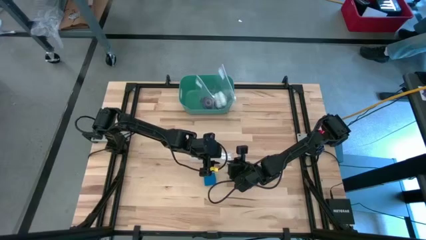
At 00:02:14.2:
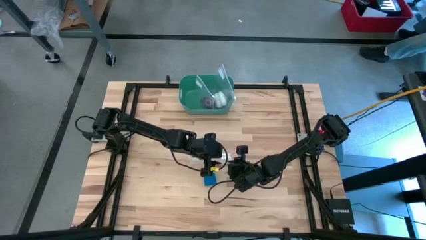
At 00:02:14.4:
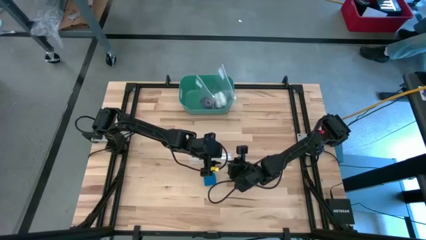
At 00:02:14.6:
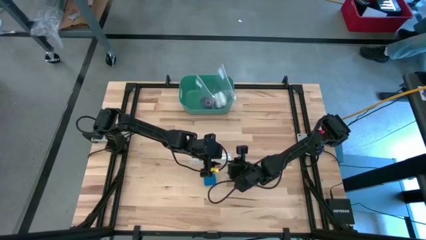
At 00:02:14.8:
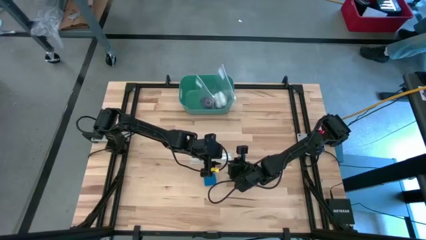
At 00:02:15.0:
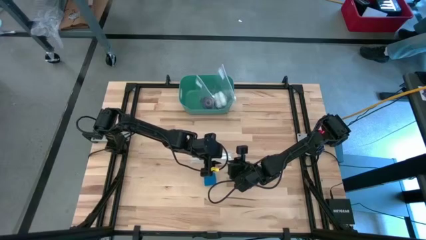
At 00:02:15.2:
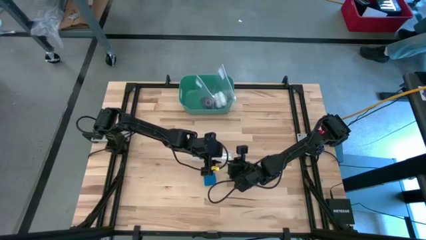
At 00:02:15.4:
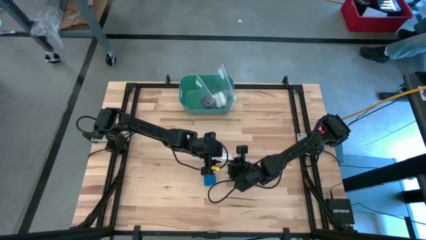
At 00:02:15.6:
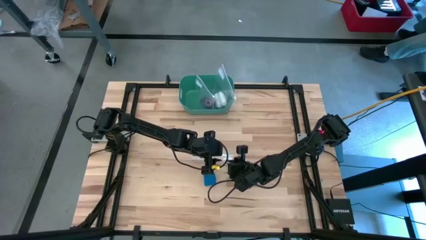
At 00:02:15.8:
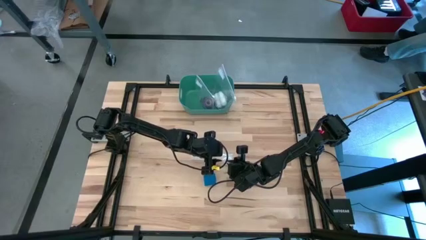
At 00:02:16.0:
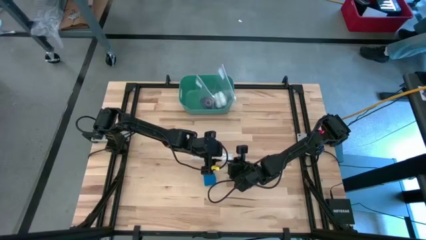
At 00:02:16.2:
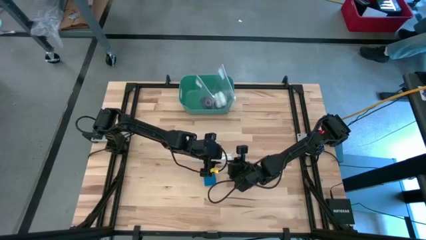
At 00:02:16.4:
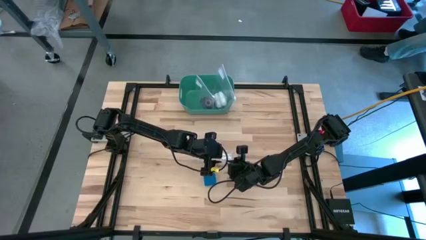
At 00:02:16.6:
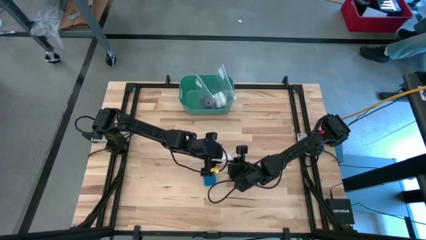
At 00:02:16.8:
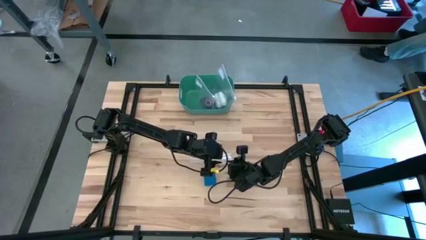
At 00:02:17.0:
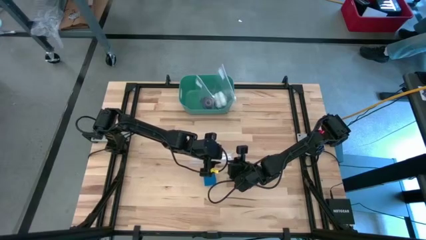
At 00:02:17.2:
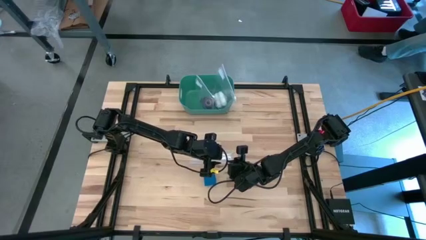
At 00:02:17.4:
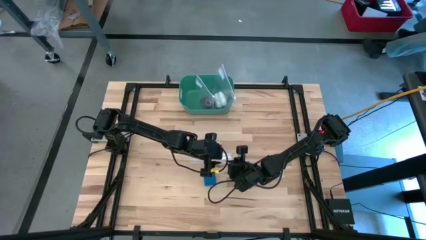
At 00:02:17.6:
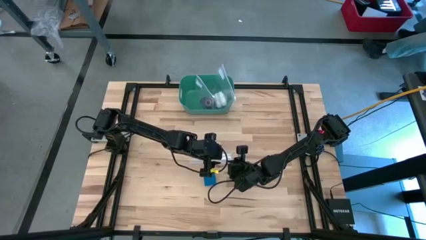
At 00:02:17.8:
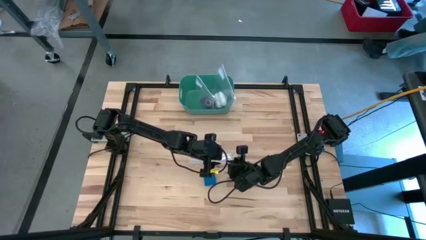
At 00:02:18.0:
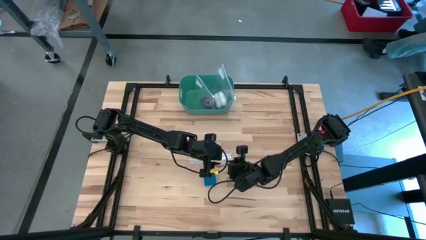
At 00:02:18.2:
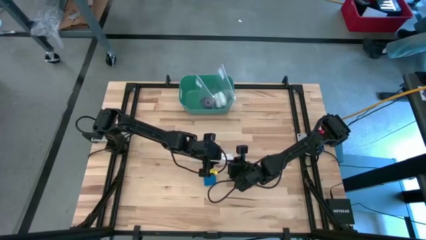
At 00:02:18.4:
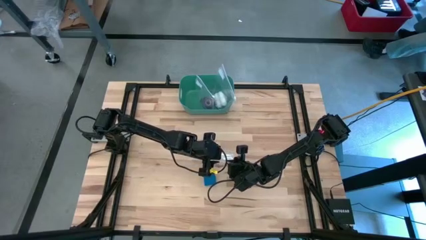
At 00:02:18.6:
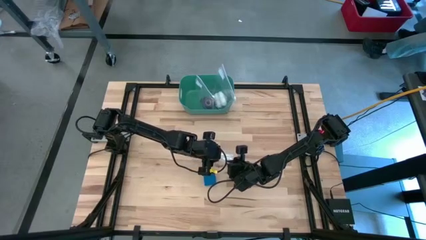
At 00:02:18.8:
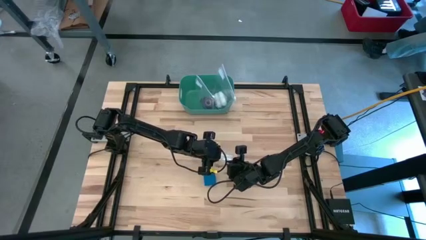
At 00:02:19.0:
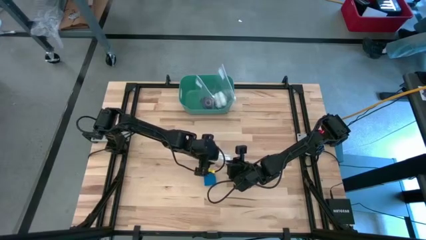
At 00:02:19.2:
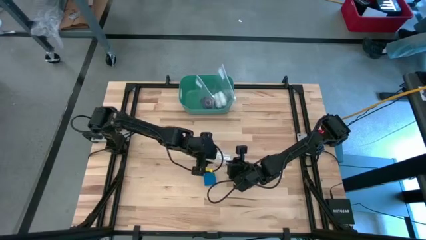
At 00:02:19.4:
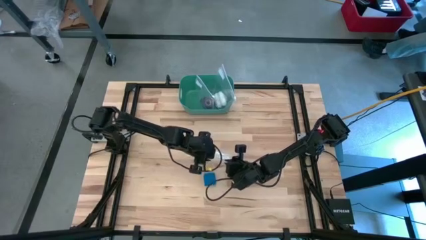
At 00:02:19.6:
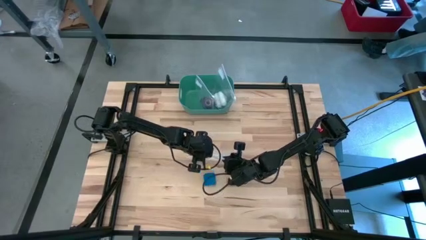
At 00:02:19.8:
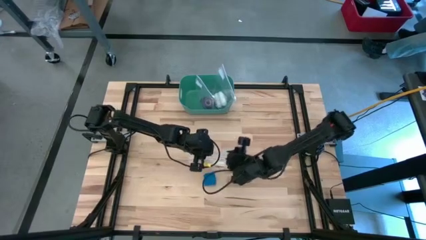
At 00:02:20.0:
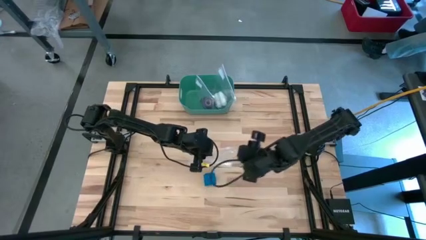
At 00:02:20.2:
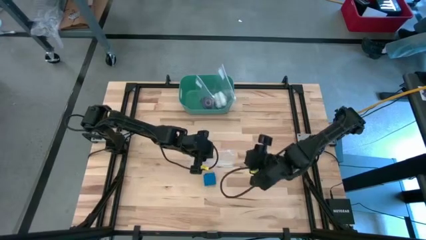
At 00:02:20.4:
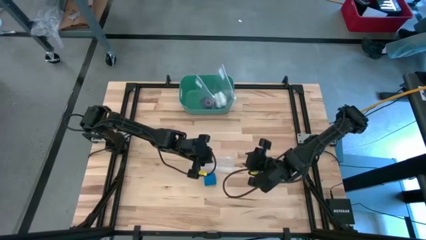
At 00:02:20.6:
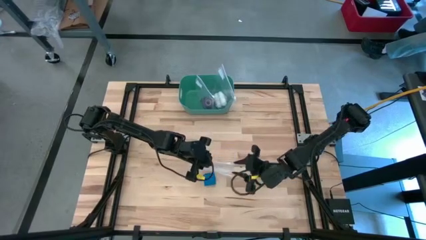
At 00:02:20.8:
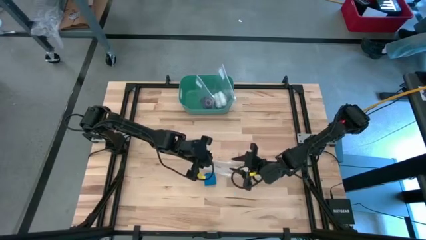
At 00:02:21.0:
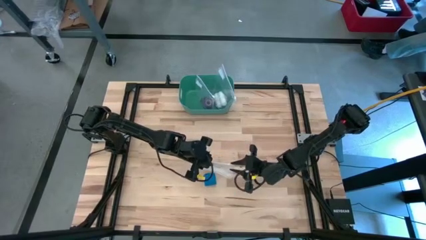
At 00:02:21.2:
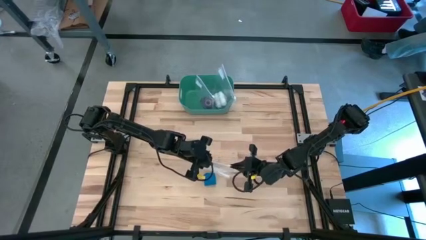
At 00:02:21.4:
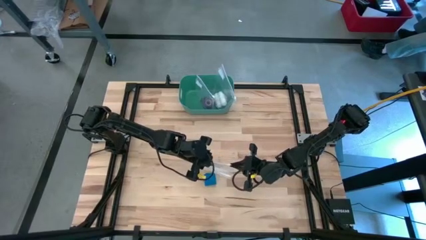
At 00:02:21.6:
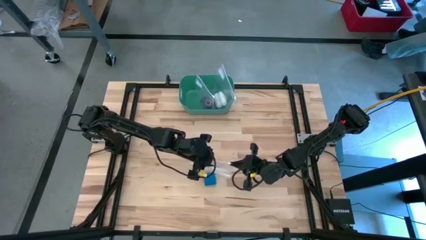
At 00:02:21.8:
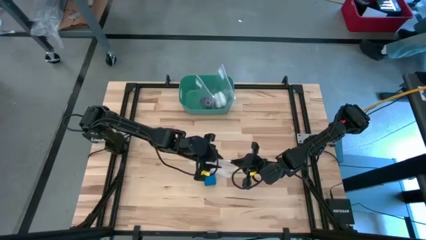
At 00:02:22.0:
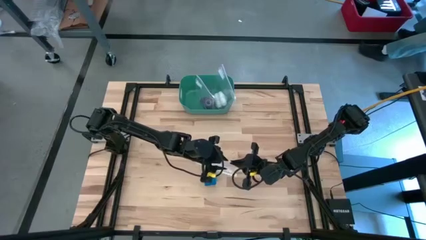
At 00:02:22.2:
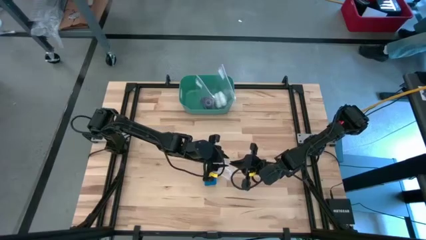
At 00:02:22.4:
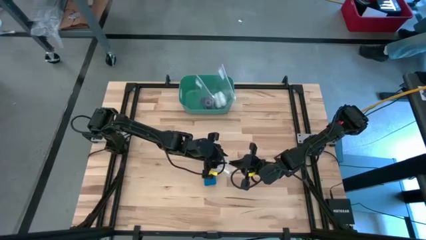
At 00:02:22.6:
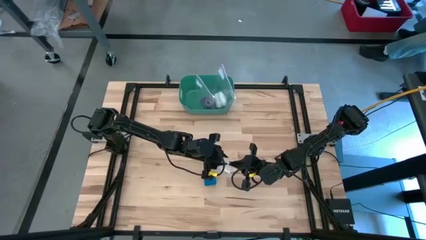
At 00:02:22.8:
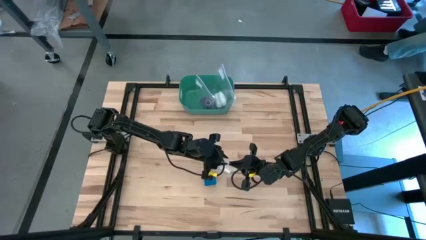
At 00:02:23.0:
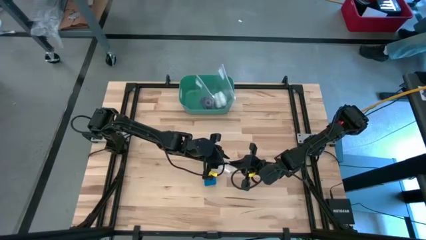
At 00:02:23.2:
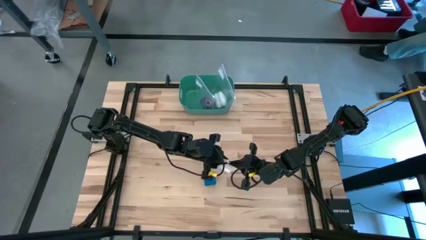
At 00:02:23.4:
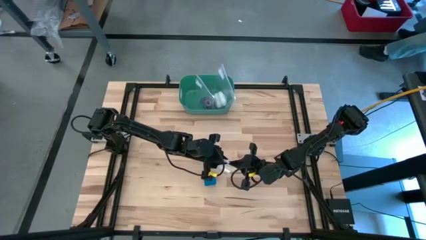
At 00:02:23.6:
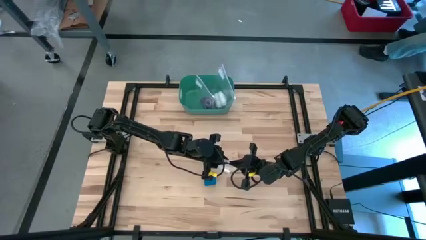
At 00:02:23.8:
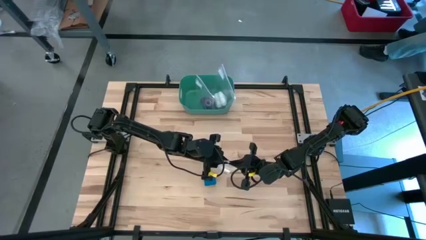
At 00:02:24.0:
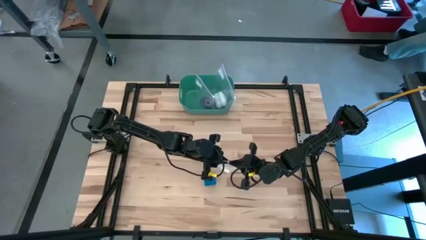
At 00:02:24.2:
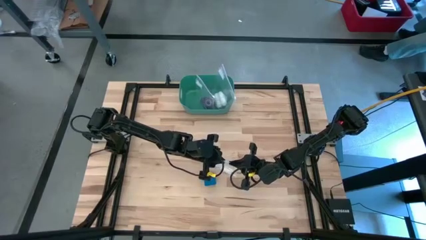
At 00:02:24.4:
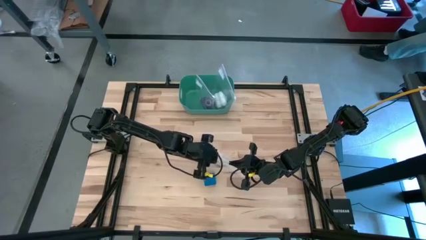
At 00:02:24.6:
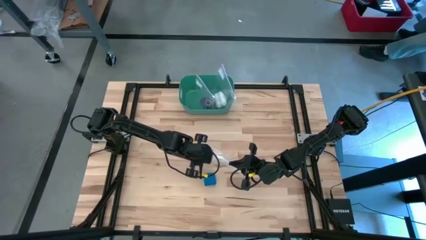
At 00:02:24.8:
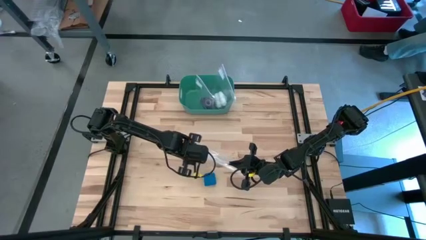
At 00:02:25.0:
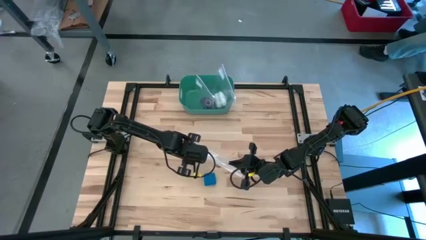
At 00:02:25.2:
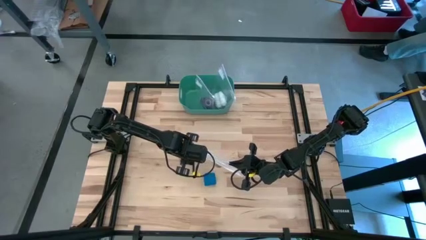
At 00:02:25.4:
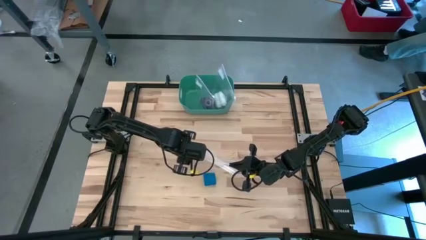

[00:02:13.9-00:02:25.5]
Task: Roll bandage
Open the transparent zip bag
